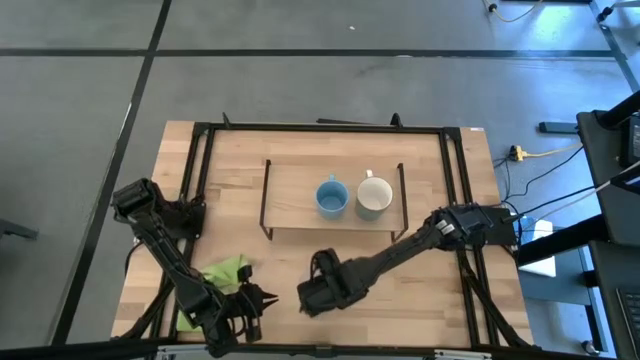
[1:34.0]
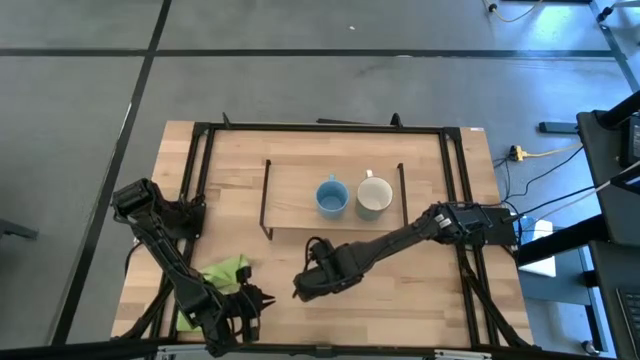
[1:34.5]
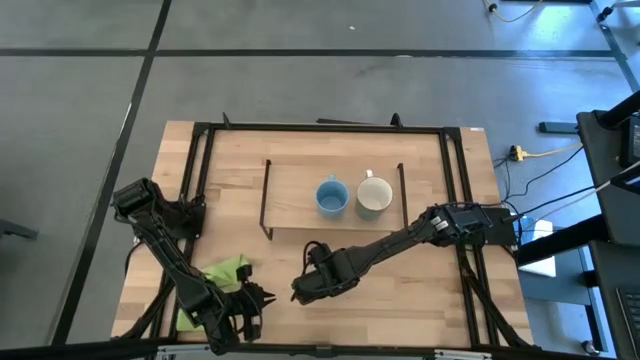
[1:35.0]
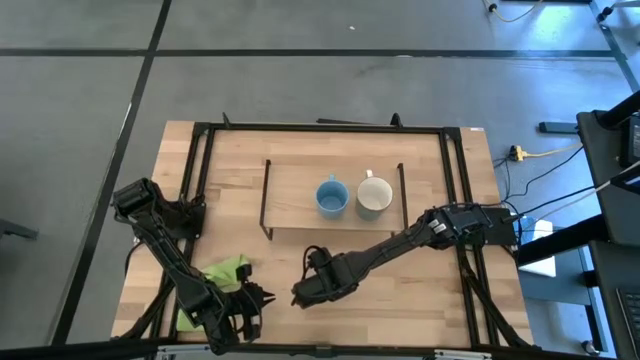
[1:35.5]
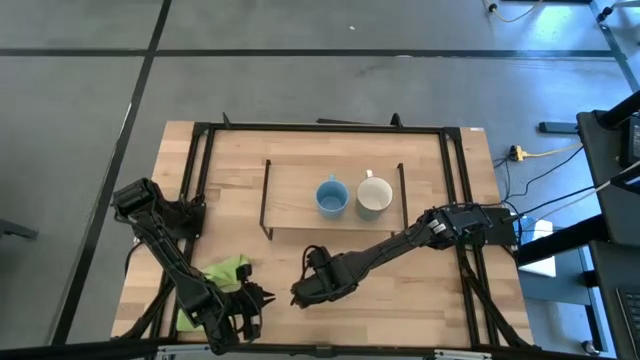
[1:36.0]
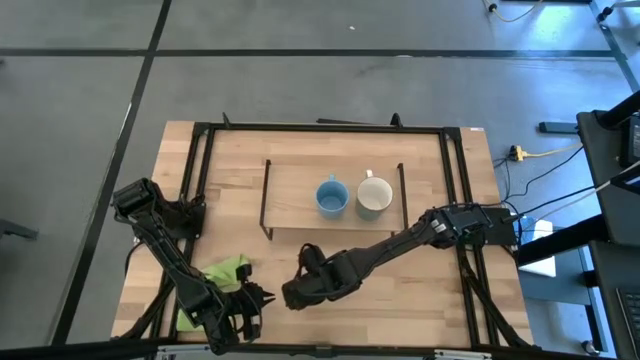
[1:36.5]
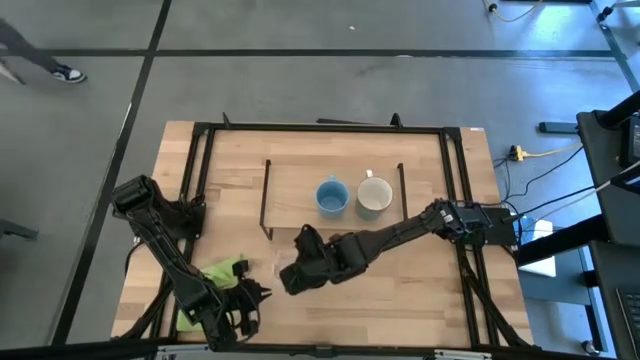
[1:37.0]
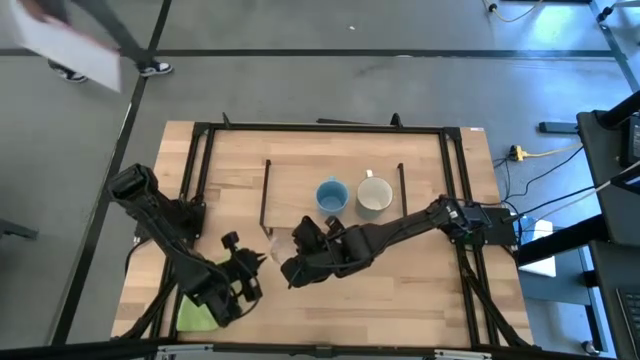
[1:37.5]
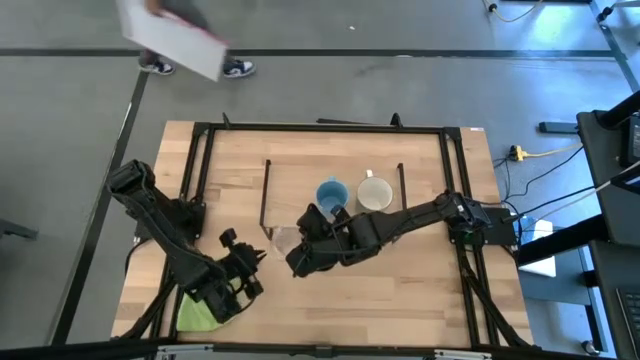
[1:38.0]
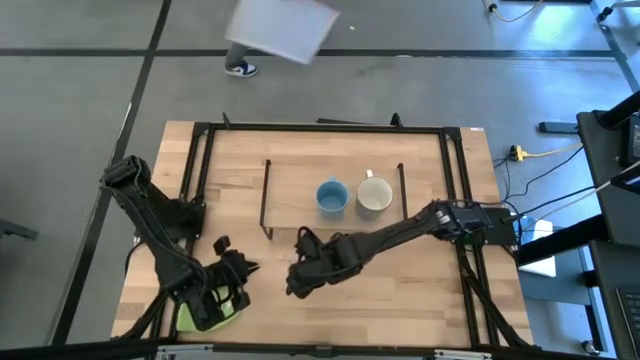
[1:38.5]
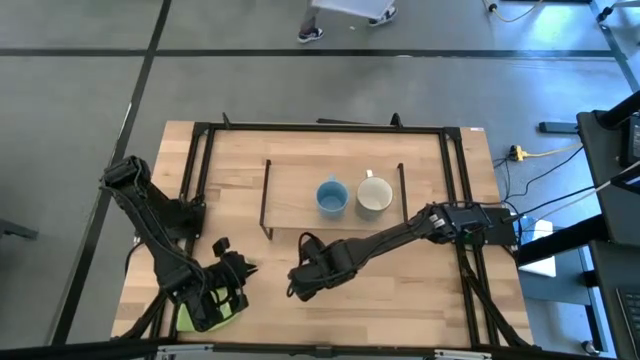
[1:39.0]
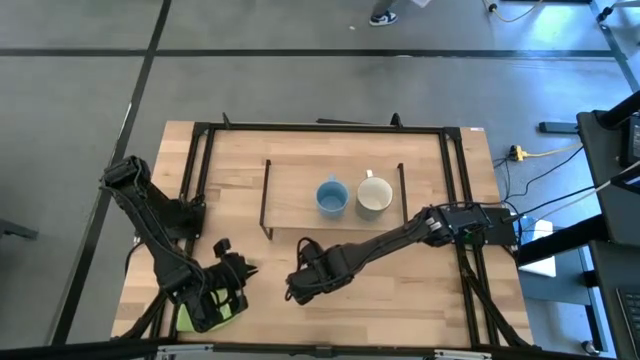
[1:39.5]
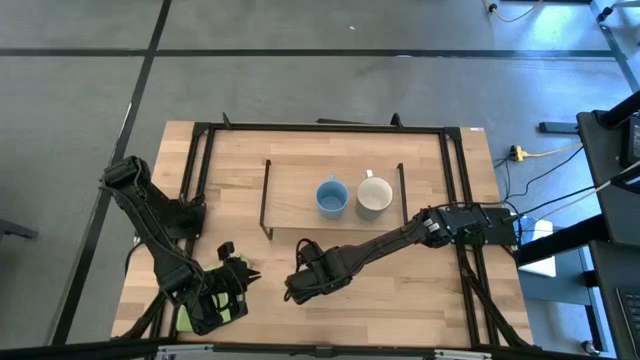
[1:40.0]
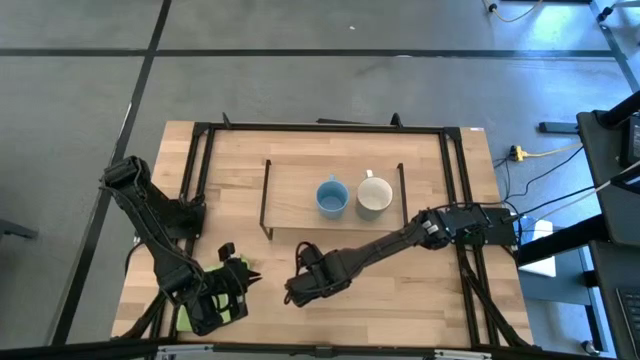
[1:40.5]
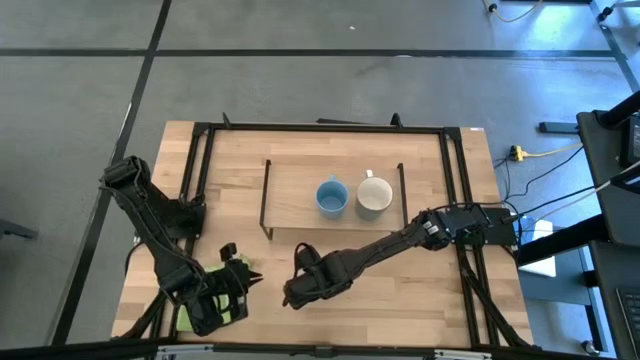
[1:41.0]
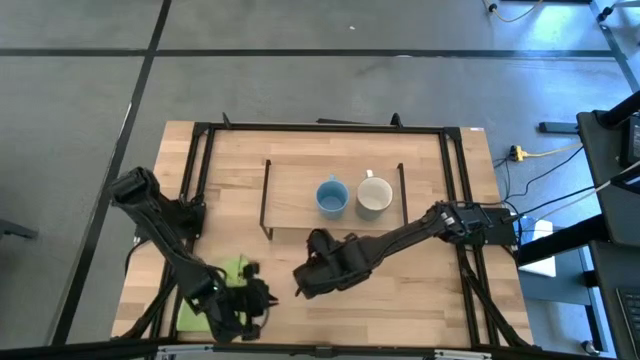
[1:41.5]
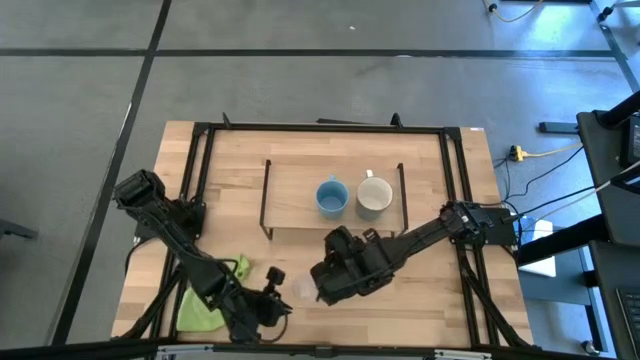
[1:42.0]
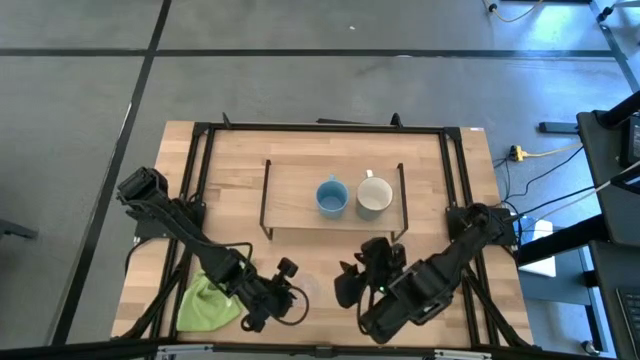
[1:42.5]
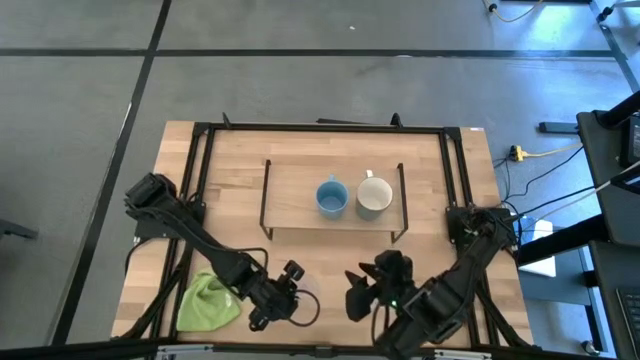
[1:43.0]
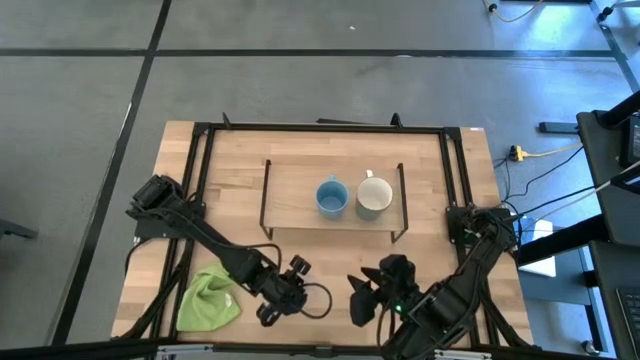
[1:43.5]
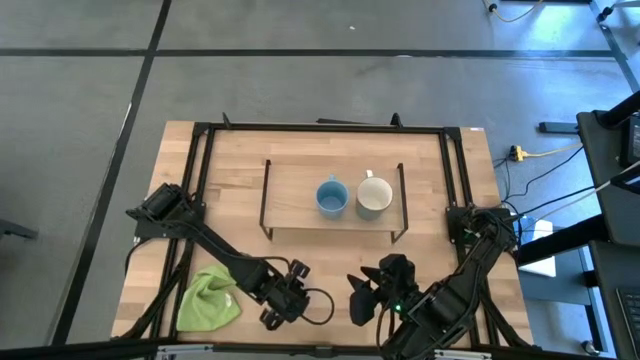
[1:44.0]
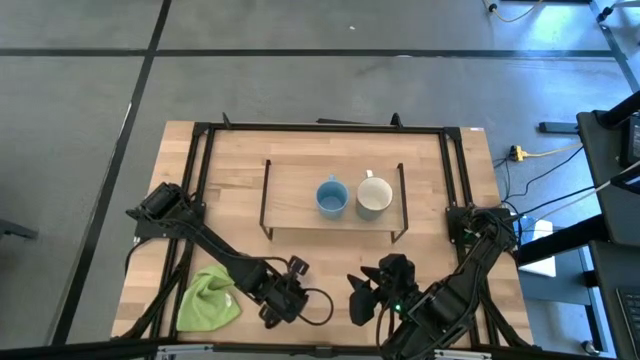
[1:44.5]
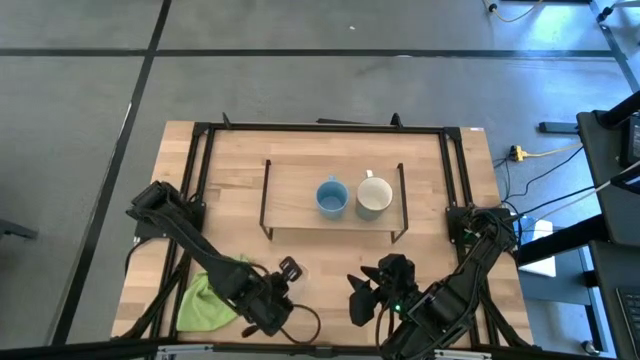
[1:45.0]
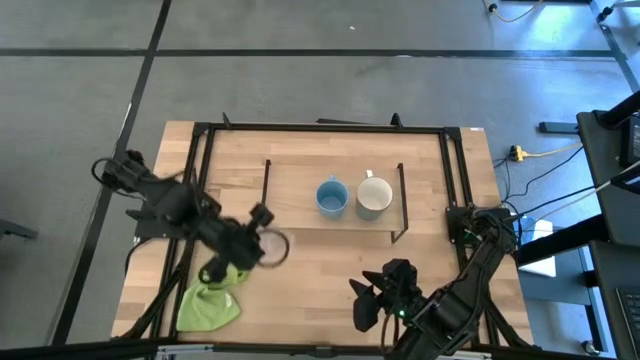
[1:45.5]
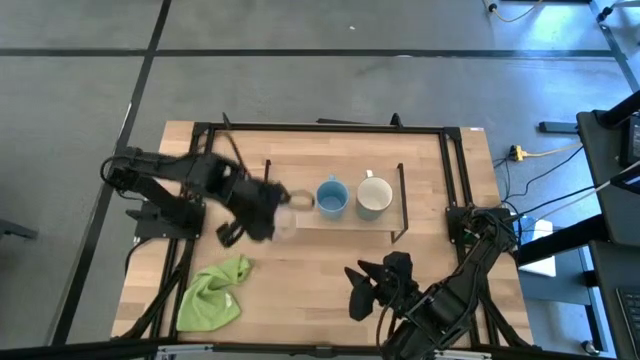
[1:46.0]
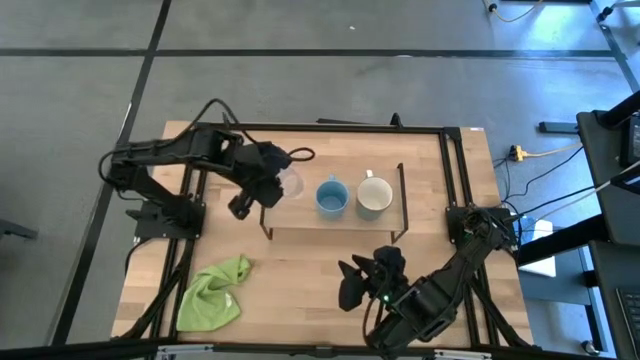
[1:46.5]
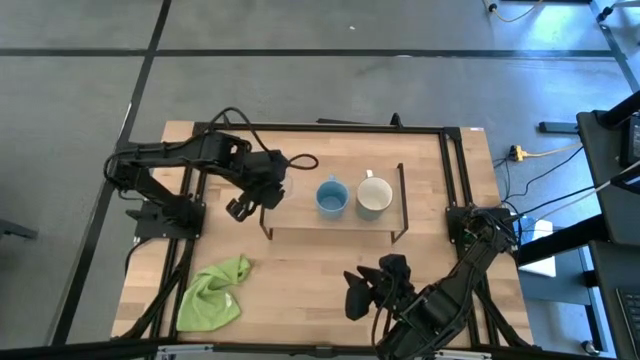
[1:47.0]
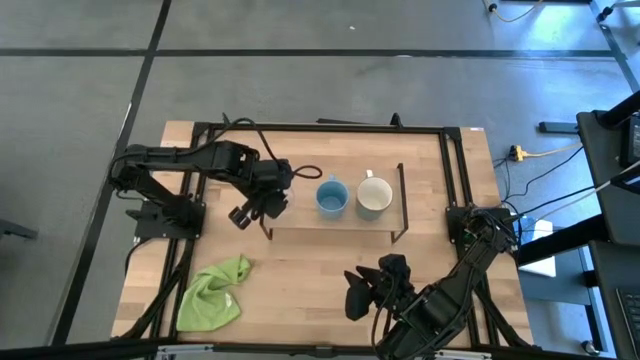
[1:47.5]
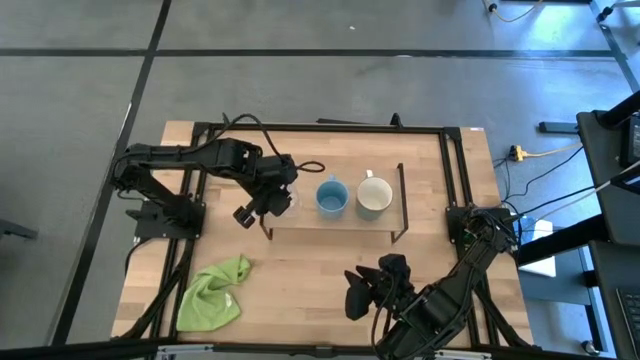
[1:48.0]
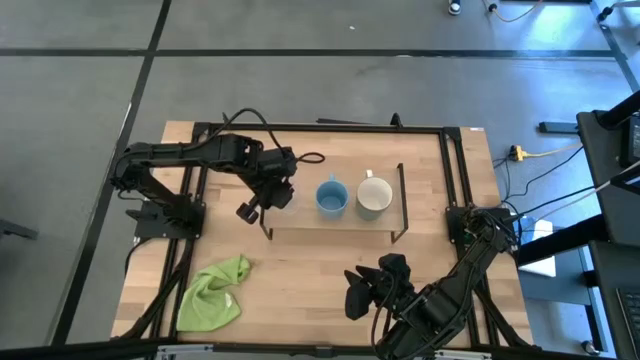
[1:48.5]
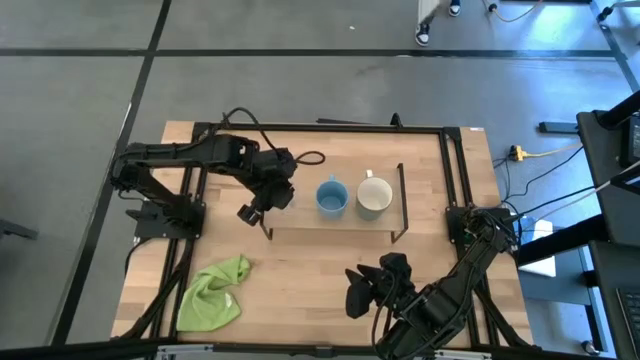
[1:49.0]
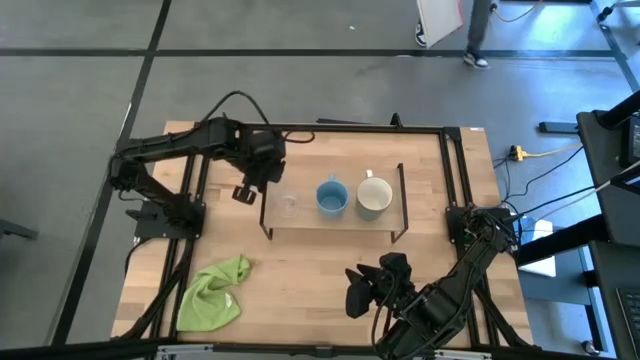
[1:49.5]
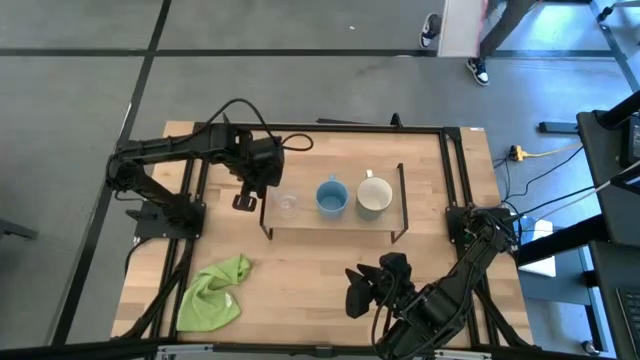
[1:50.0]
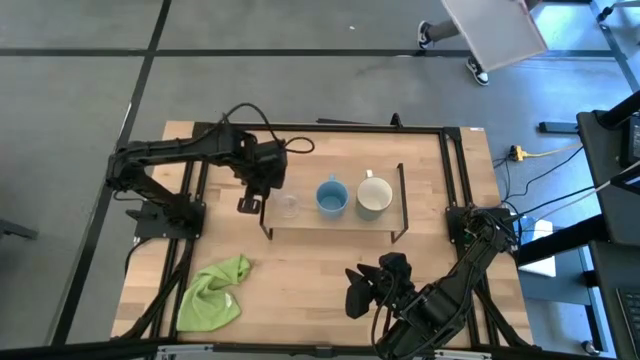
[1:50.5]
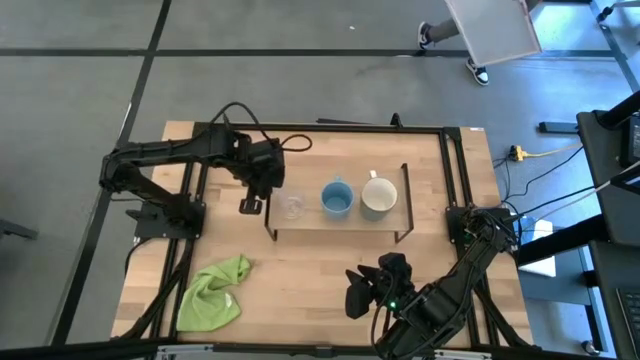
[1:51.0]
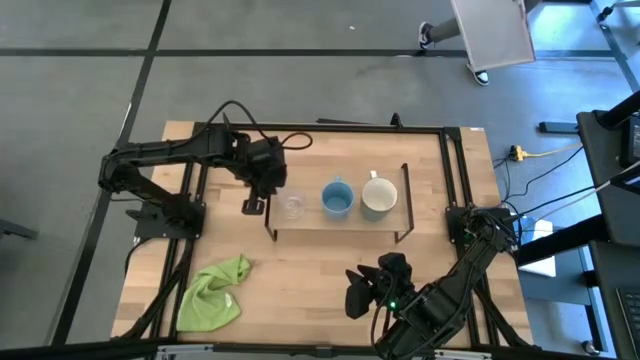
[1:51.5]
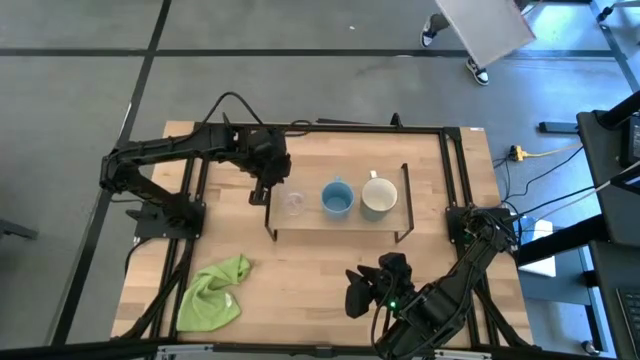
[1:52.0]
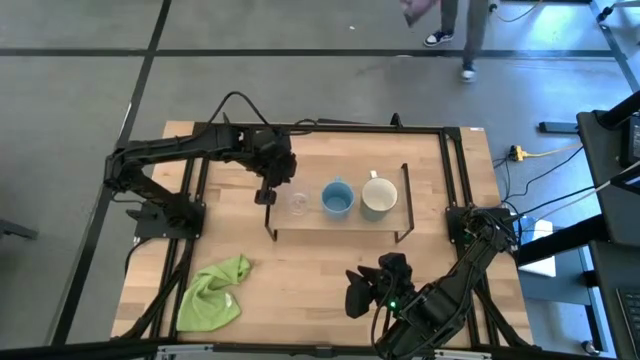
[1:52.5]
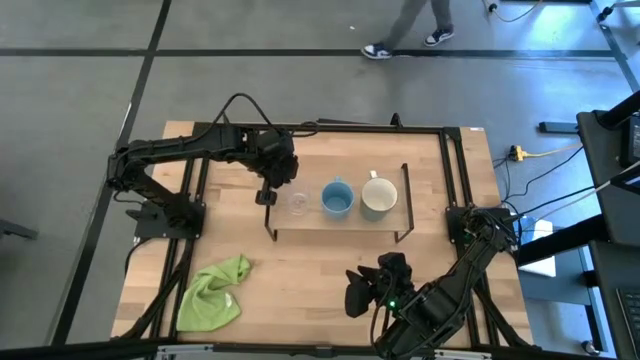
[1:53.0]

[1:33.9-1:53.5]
Task: Stack small to large cups/mugs on shelf
Put the transparent mug on the shelf

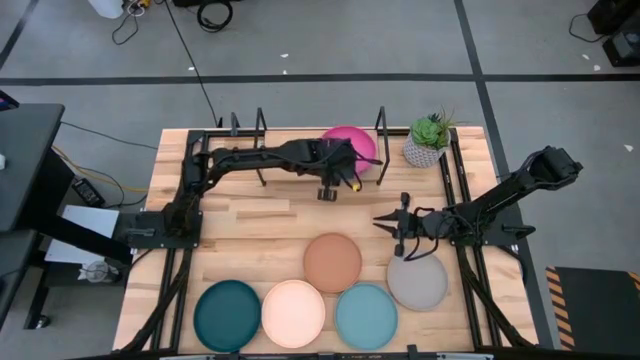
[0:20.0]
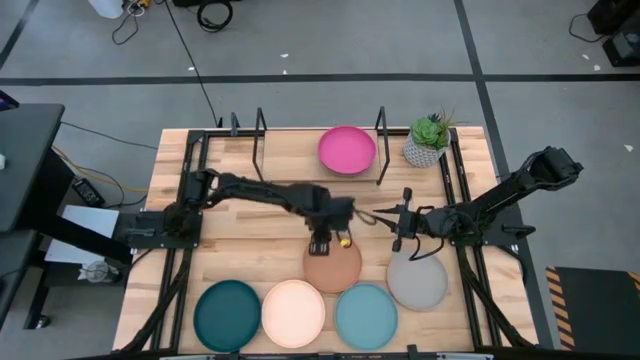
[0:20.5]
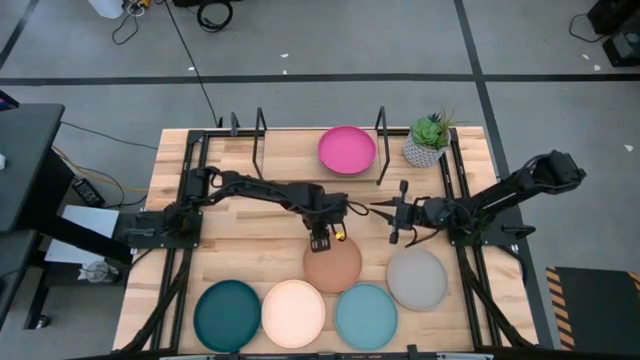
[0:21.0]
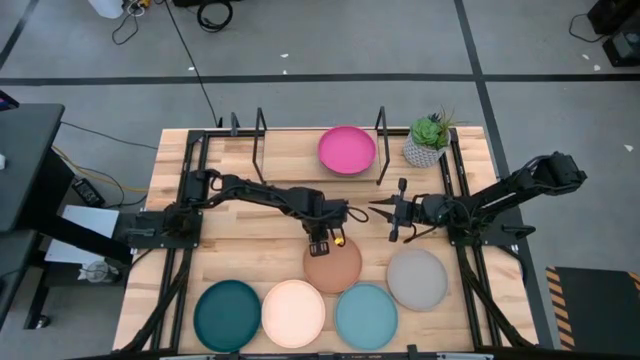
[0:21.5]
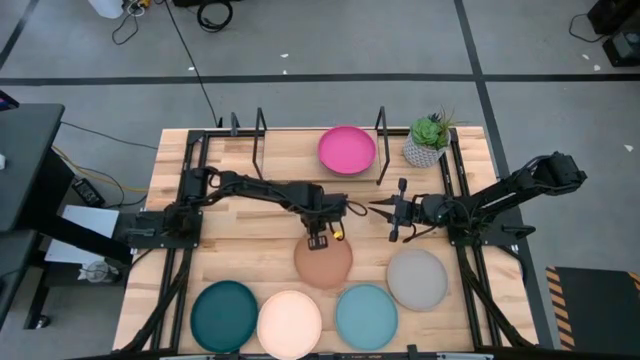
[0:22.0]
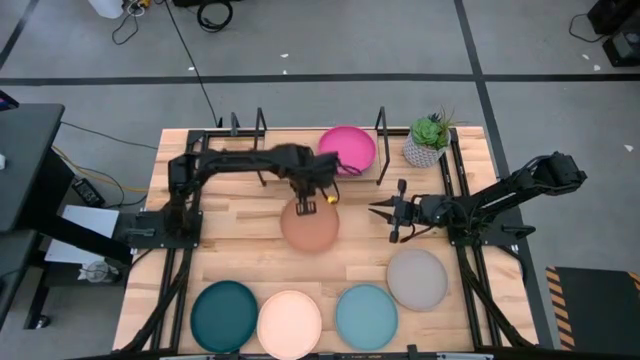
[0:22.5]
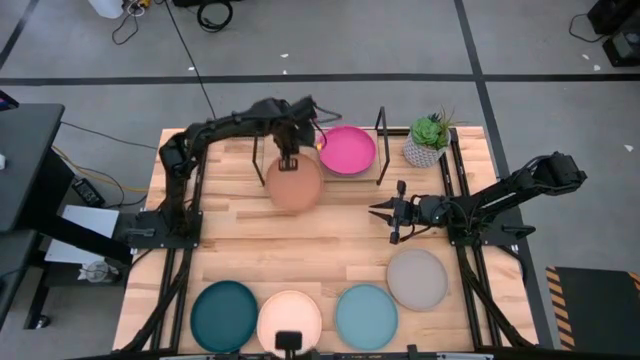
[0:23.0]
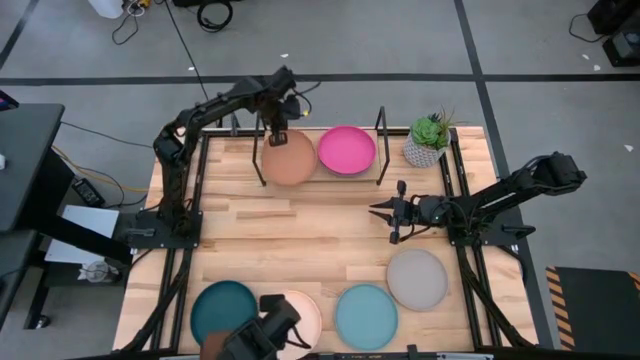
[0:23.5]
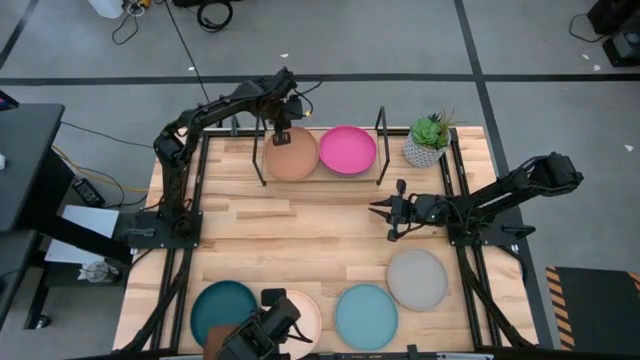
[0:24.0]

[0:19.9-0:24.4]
Task: Place and stack plates onto a shelf
Put the light brown plate on the shelf
